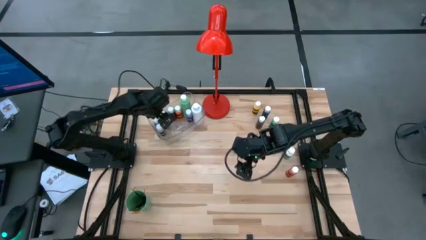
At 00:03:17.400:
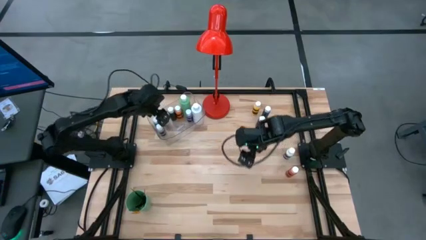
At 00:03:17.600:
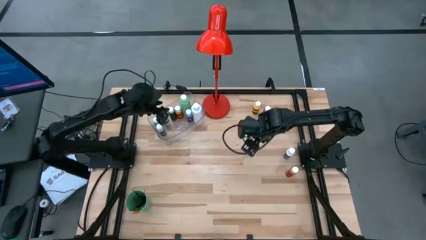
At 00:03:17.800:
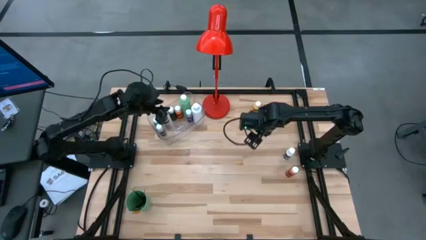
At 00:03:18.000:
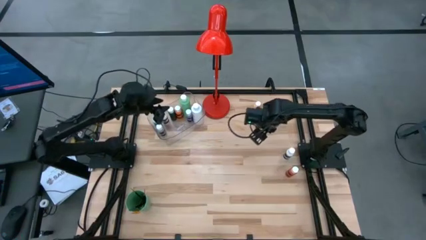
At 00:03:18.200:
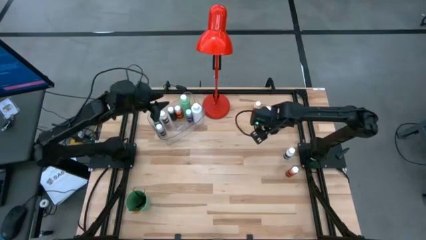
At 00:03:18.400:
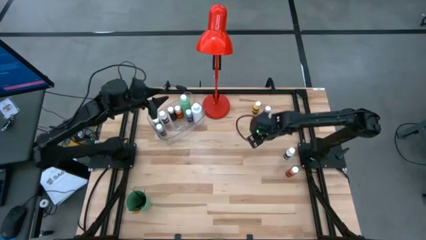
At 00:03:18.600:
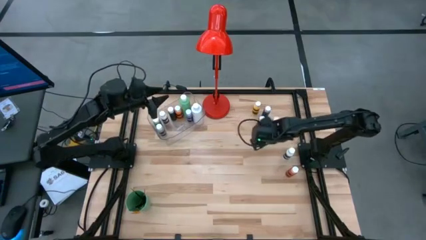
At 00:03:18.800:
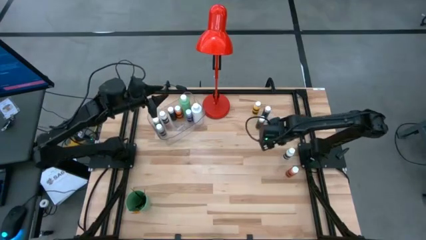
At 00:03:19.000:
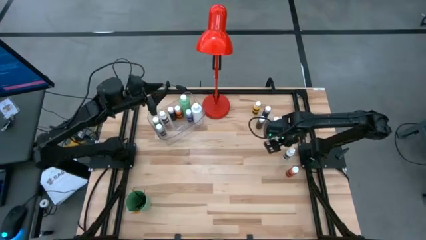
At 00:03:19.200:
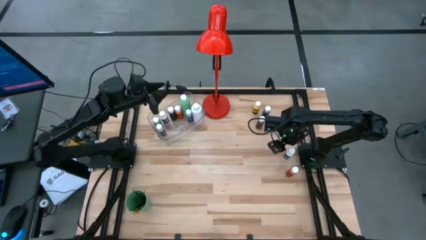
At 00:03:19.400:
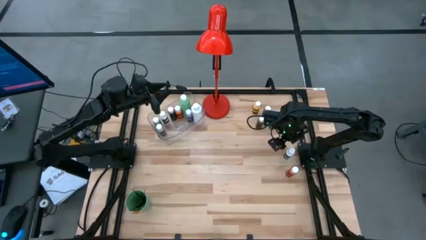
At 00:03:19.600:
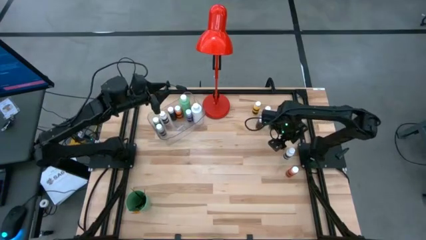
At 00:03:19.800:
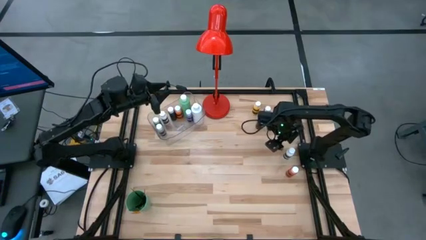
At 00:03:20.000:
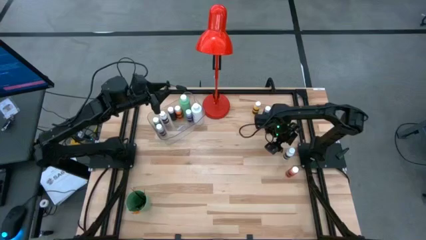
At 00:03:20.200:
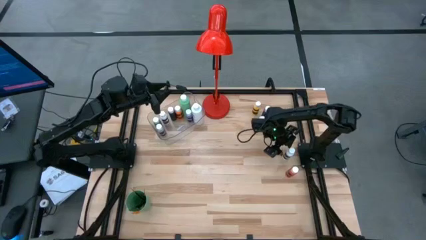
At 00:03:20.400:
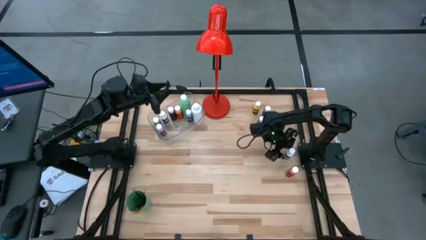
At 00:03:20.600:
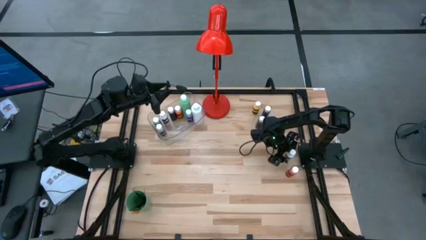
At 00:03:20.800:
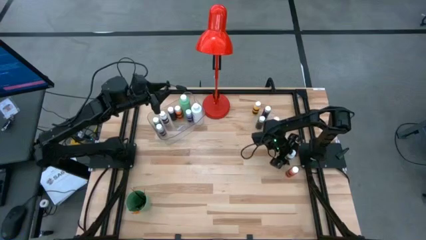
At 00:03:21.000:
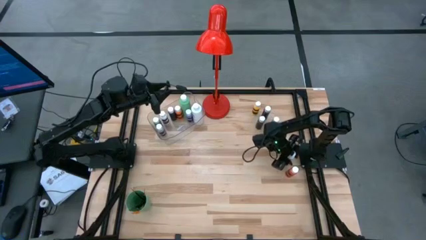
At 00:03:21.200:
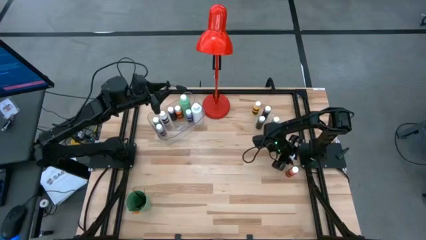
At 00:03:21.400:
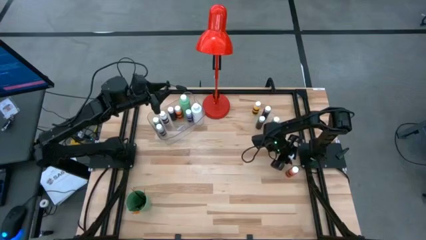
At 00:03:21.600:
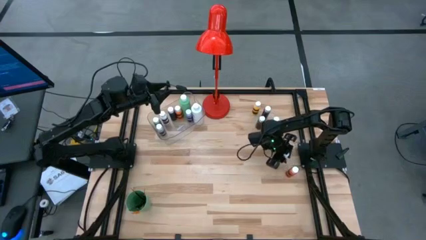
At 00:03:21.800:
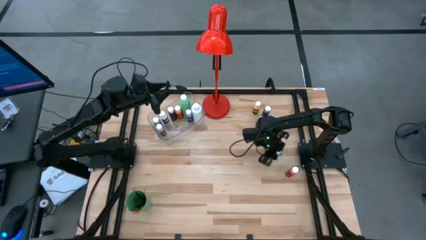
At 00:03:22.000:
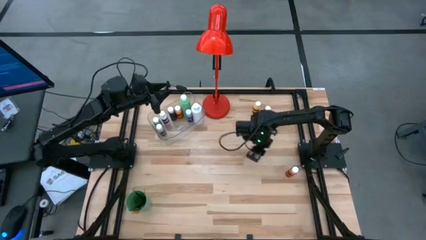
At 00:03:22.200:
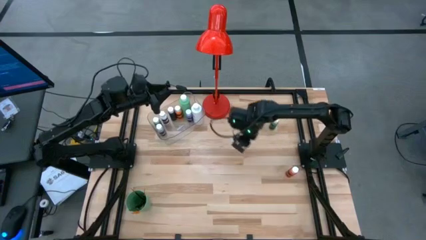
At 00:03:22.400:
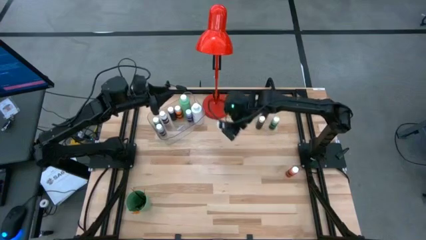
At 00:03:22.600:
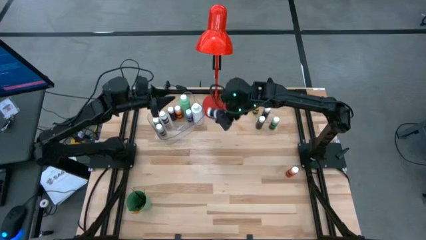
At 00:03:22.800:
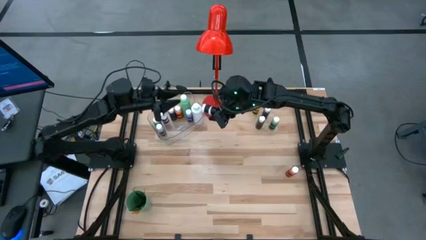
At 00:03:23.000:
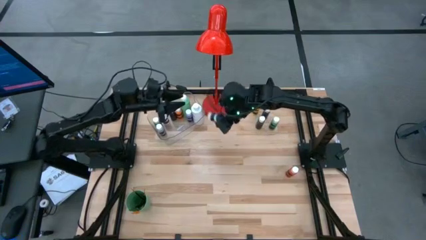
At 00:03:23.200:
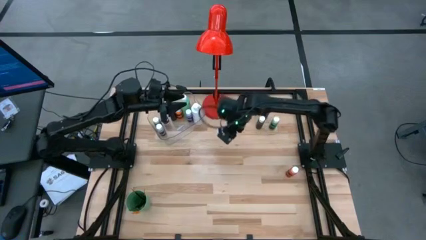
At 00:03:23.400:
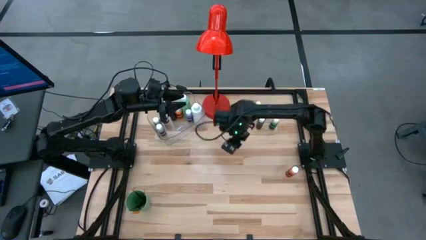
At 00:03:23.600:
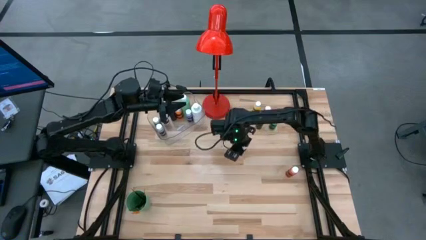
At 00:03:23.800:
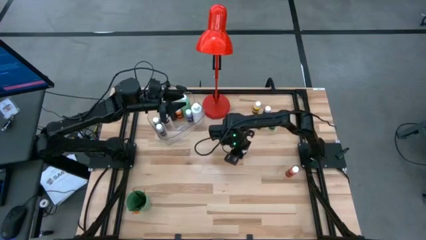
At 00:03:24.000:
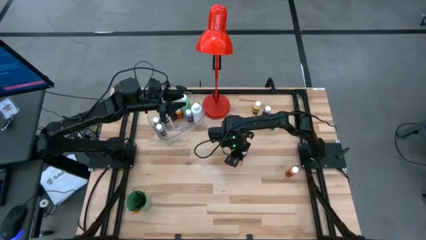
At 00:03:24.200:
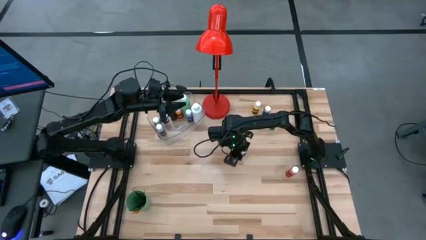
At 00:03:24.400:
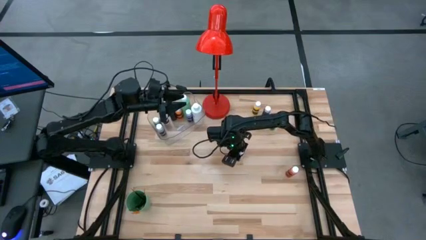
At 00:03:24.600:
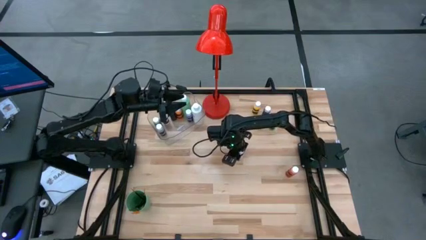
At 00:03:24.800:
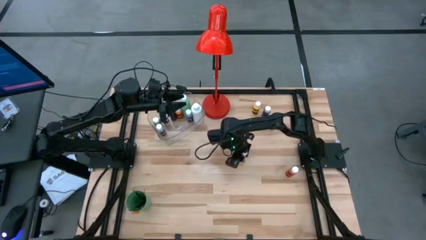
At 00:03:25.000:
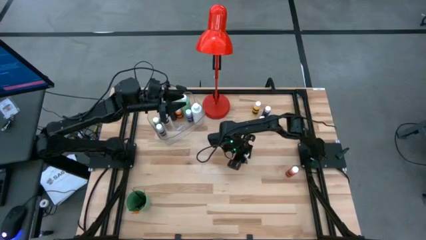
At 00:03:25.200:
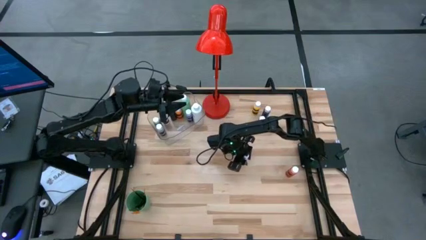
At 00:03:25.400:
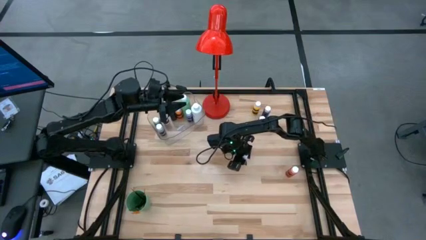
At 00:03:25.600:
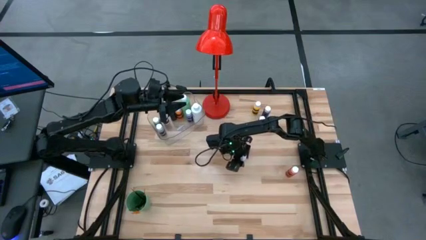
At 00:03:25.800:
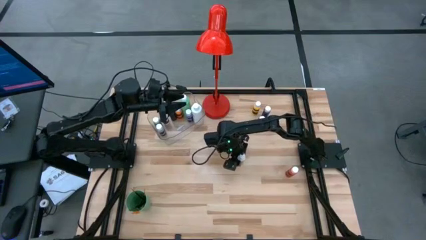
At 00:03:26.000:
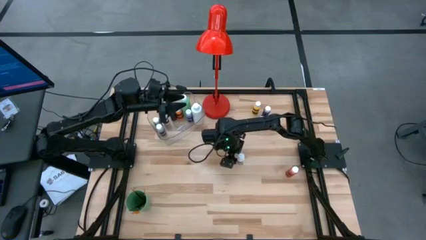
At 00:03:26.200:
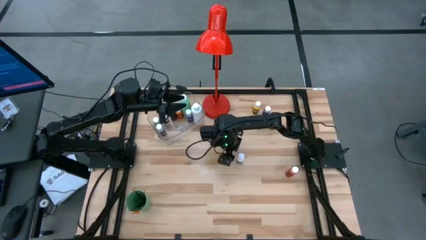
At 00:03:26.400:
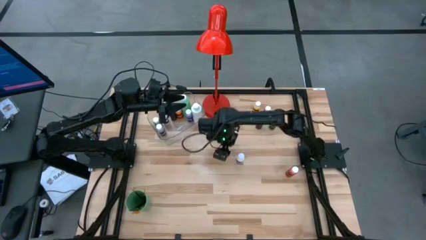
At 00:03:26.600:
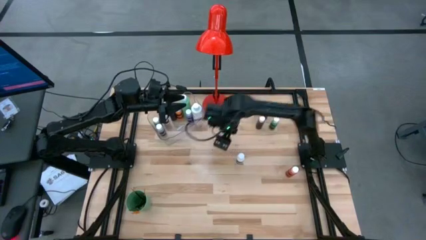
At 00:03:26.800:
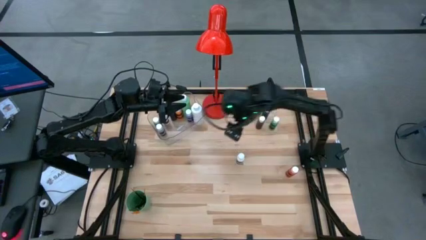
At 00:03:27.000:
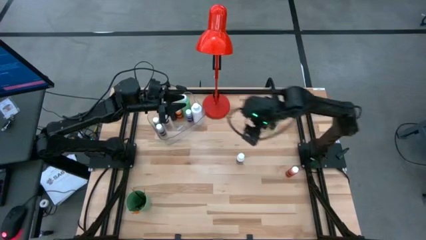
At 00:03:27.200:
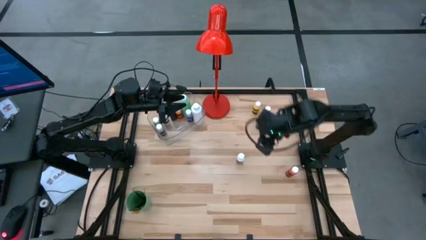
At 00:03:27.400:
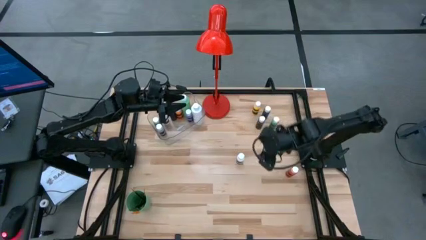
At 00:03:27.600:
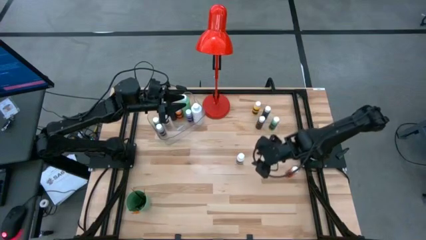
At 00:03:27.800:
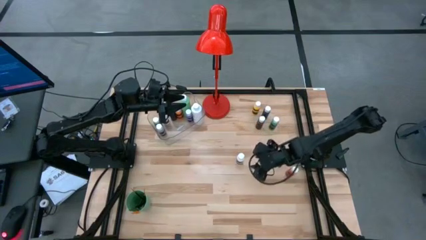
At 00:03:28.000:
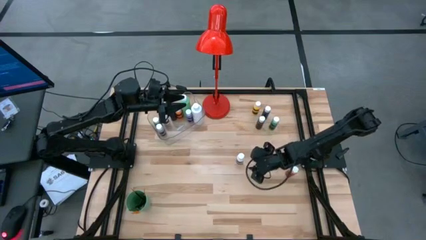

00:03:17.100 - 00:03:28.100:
Task: Pick & Place Paint Supplies
Put the white paint bottle into the transparent bin
